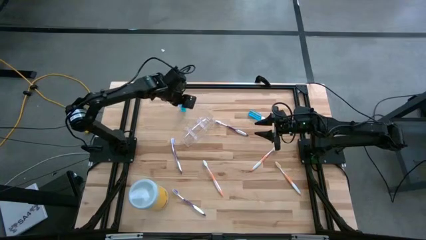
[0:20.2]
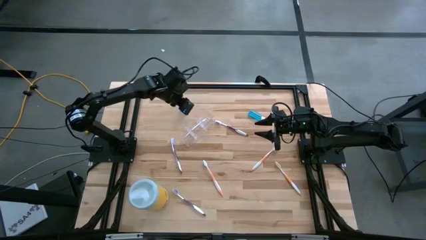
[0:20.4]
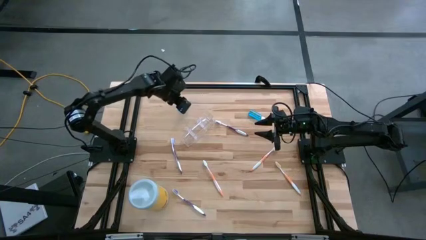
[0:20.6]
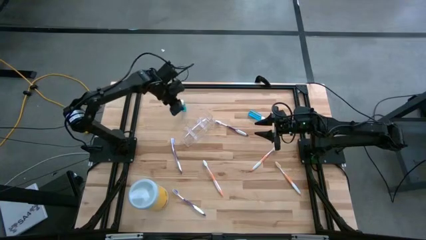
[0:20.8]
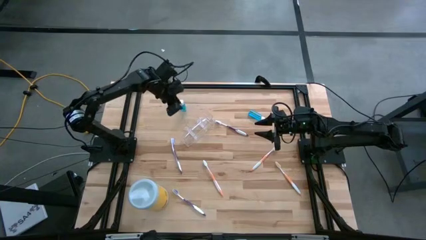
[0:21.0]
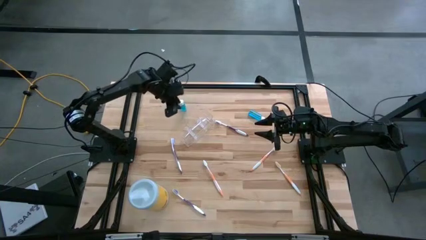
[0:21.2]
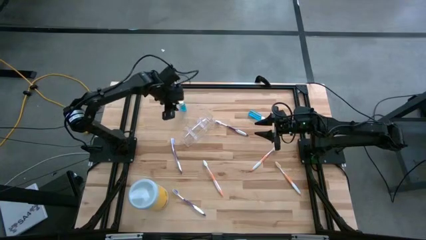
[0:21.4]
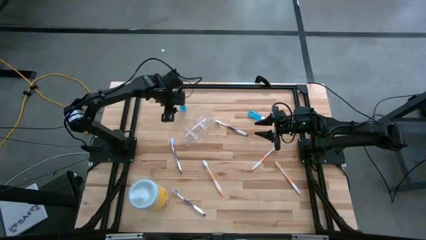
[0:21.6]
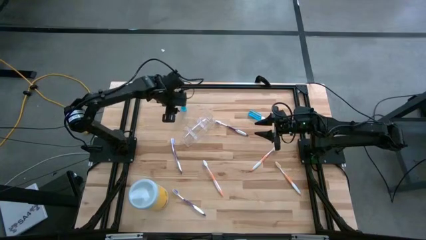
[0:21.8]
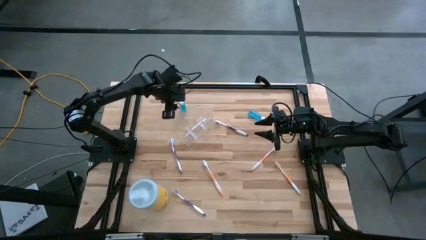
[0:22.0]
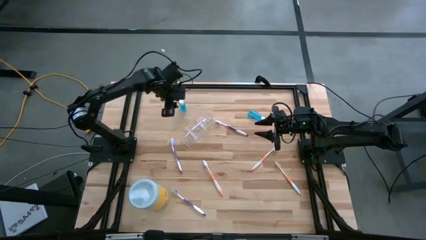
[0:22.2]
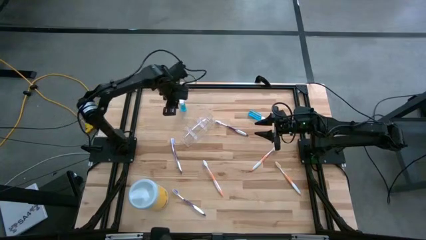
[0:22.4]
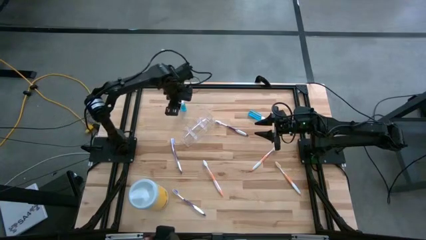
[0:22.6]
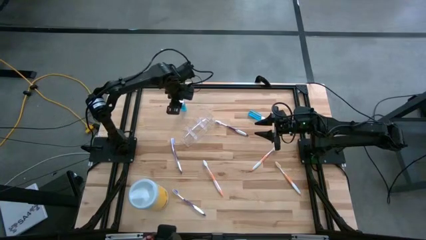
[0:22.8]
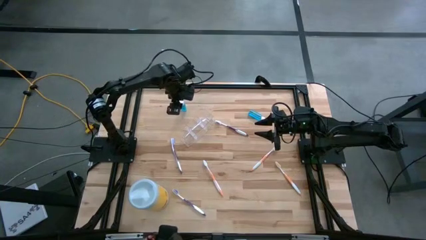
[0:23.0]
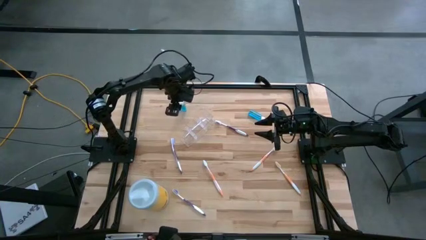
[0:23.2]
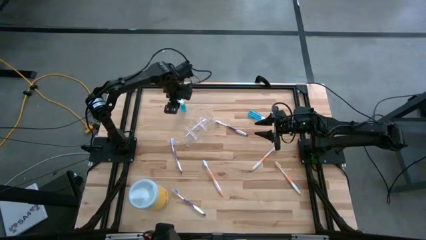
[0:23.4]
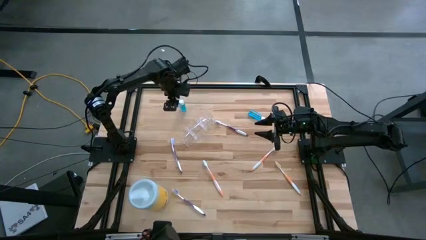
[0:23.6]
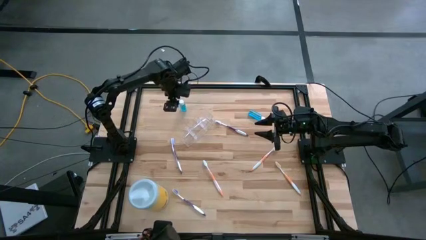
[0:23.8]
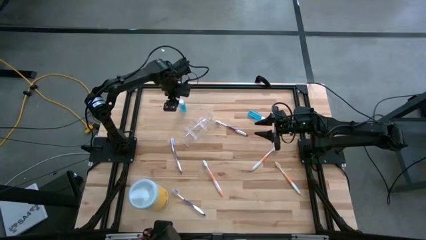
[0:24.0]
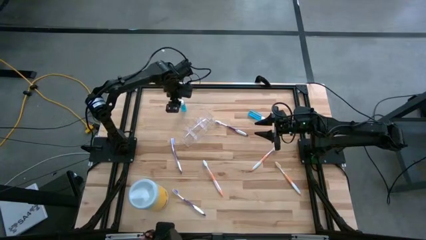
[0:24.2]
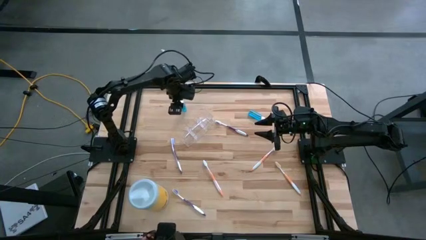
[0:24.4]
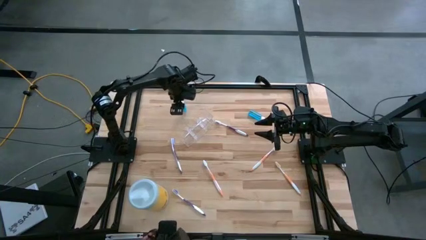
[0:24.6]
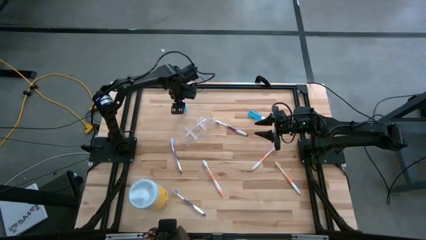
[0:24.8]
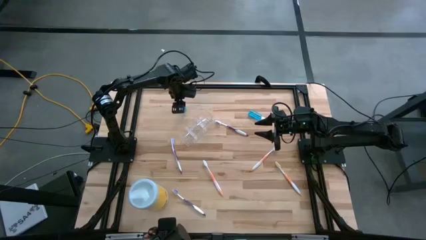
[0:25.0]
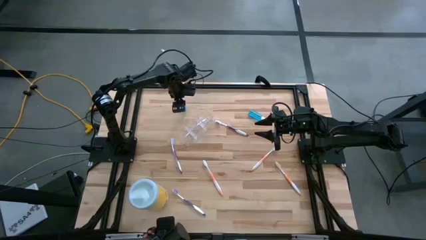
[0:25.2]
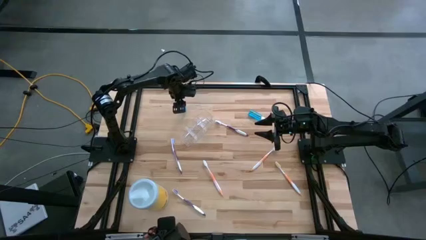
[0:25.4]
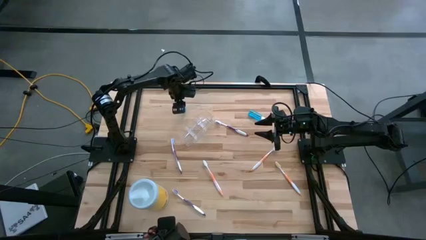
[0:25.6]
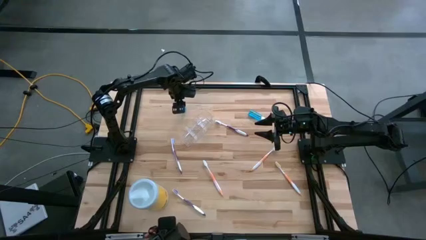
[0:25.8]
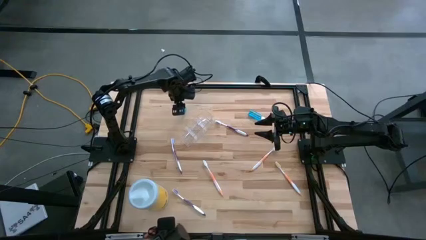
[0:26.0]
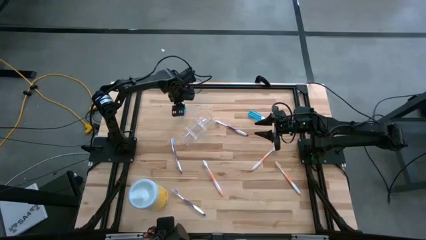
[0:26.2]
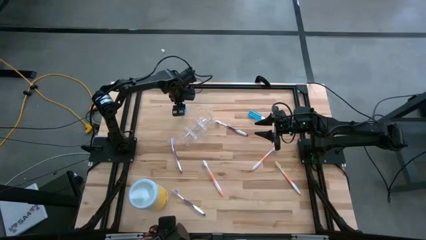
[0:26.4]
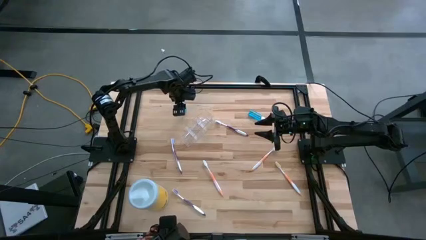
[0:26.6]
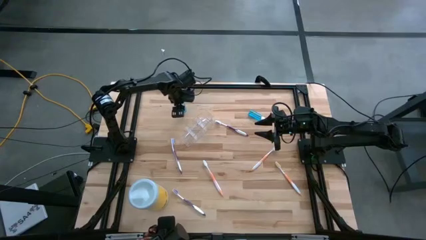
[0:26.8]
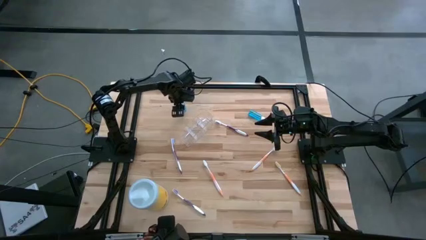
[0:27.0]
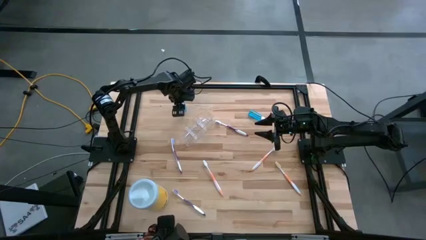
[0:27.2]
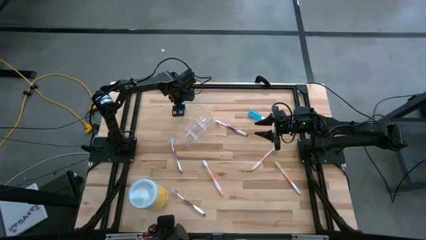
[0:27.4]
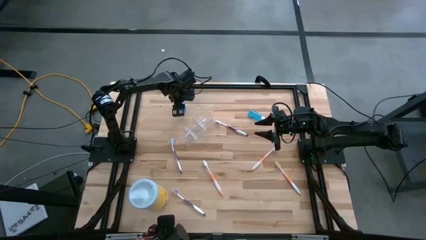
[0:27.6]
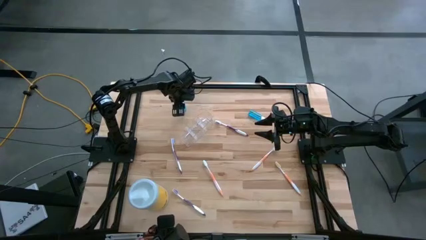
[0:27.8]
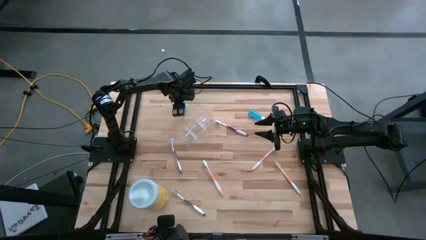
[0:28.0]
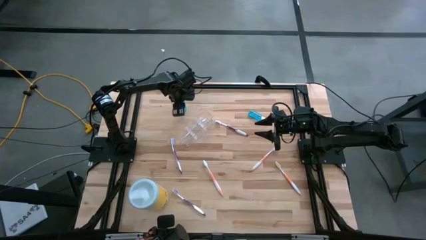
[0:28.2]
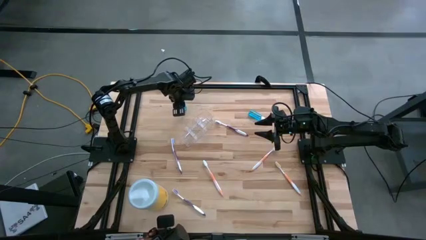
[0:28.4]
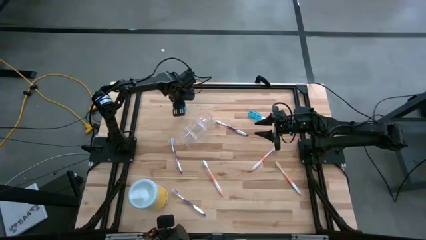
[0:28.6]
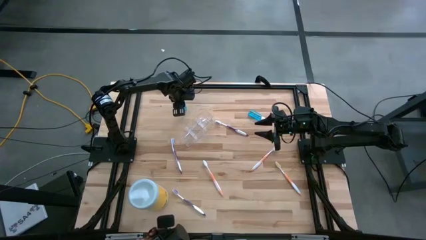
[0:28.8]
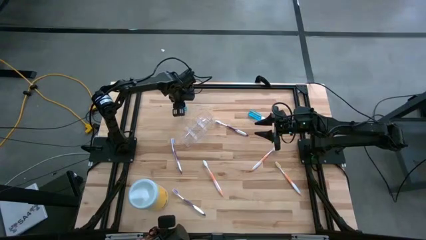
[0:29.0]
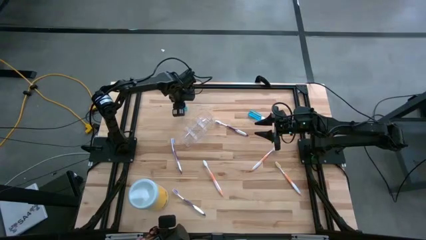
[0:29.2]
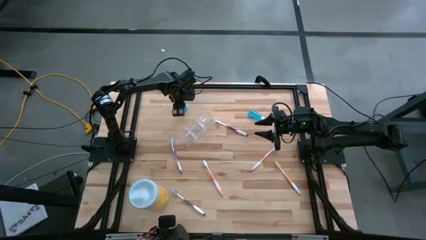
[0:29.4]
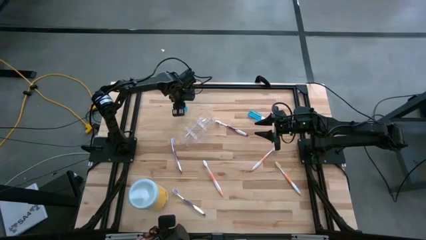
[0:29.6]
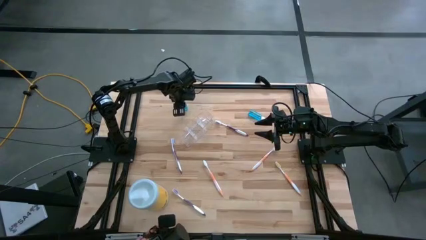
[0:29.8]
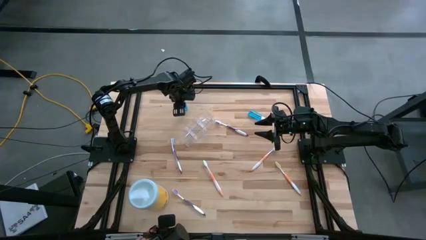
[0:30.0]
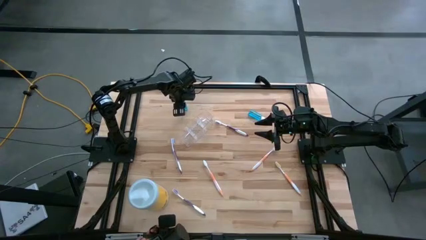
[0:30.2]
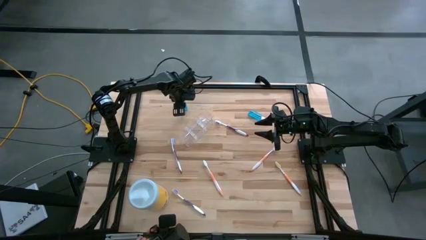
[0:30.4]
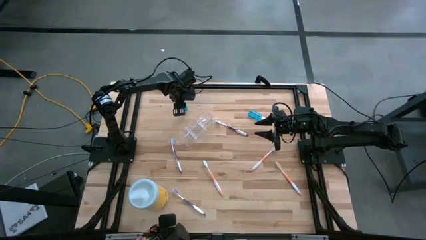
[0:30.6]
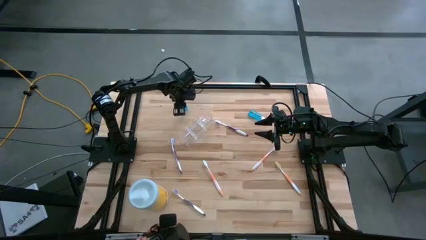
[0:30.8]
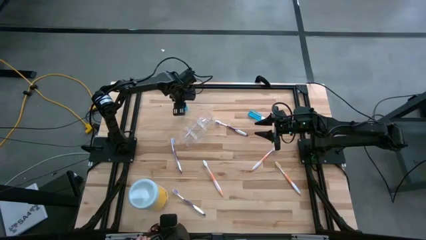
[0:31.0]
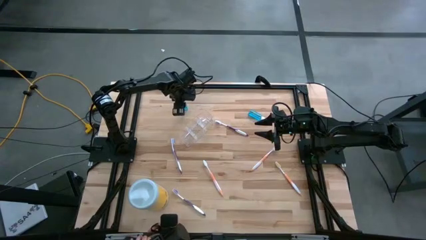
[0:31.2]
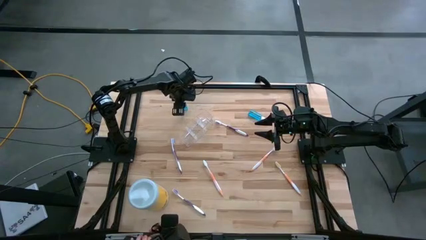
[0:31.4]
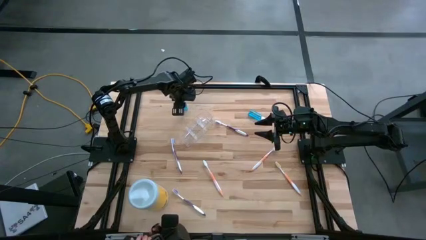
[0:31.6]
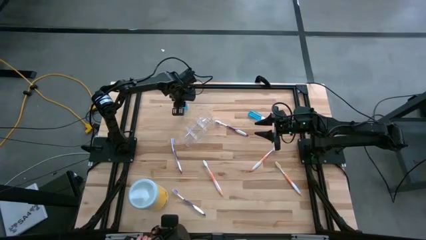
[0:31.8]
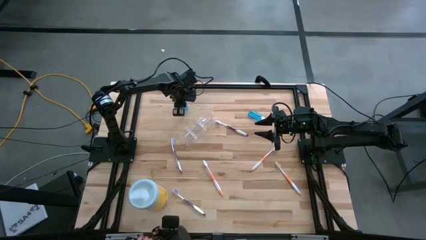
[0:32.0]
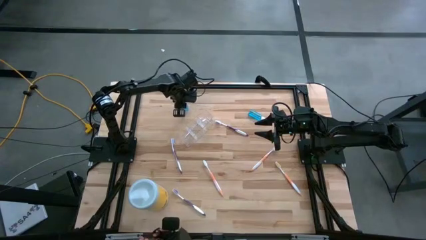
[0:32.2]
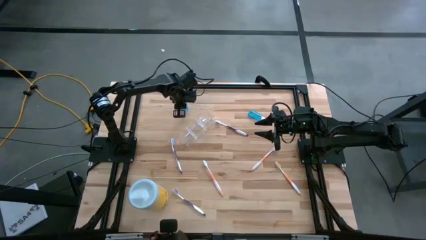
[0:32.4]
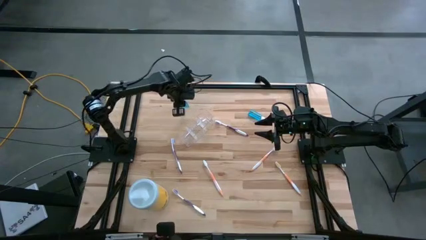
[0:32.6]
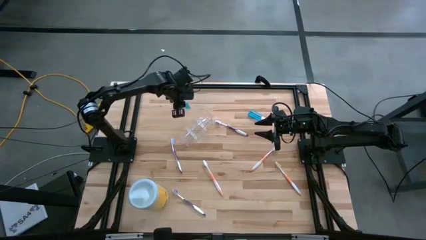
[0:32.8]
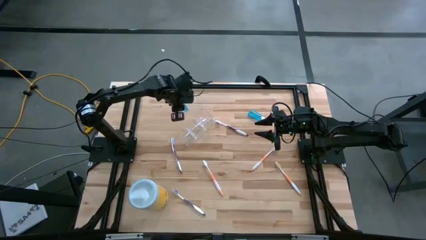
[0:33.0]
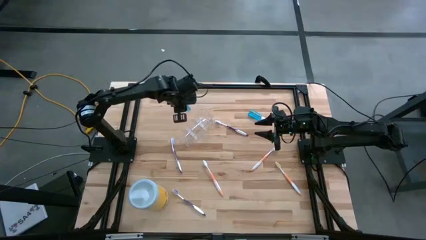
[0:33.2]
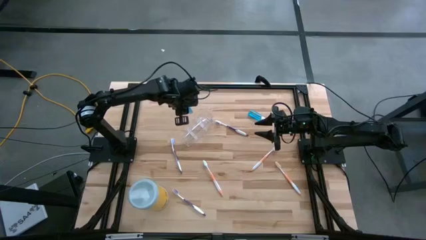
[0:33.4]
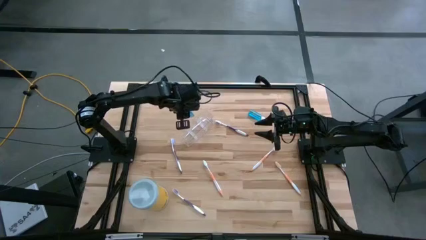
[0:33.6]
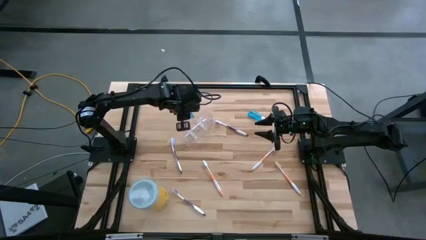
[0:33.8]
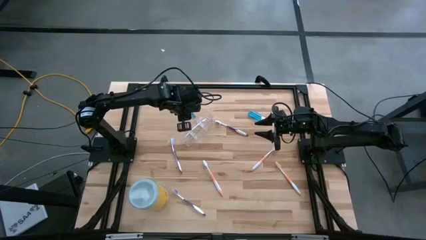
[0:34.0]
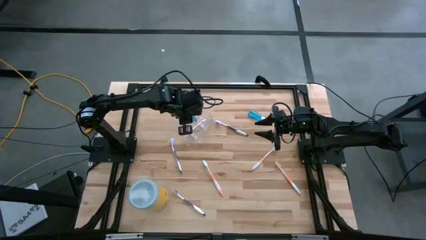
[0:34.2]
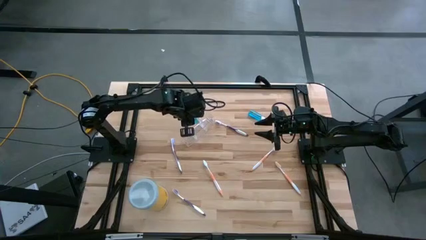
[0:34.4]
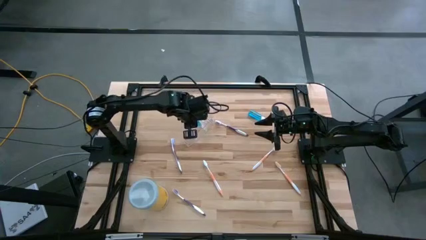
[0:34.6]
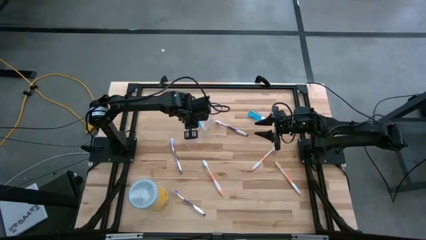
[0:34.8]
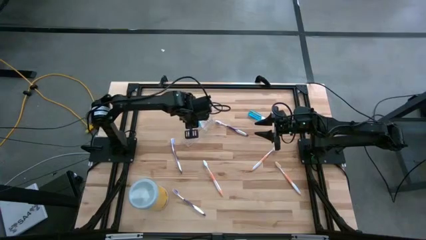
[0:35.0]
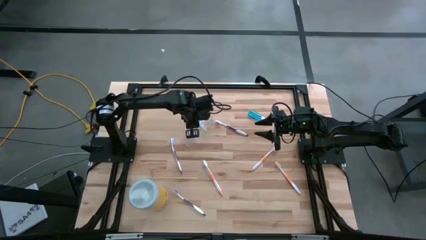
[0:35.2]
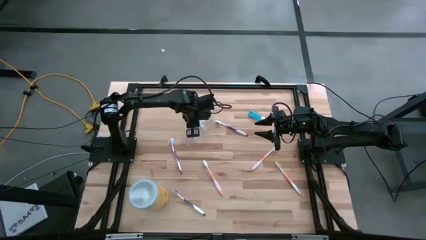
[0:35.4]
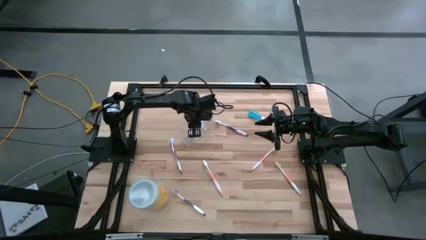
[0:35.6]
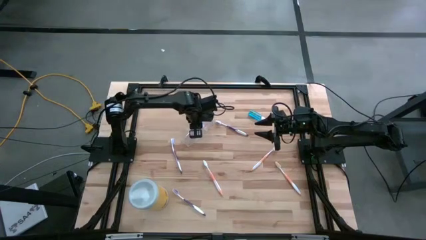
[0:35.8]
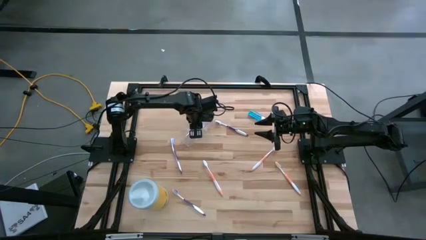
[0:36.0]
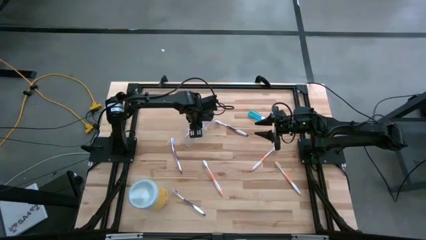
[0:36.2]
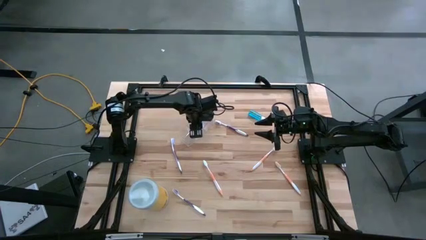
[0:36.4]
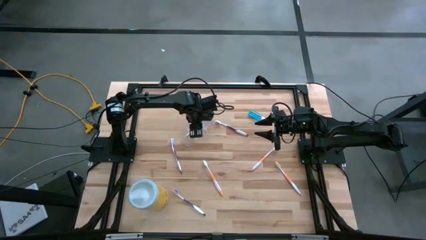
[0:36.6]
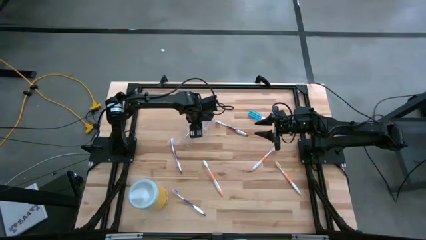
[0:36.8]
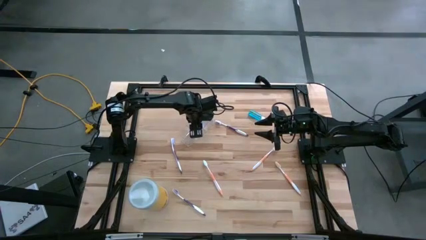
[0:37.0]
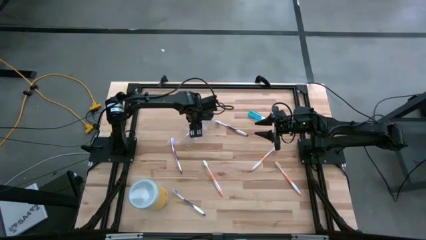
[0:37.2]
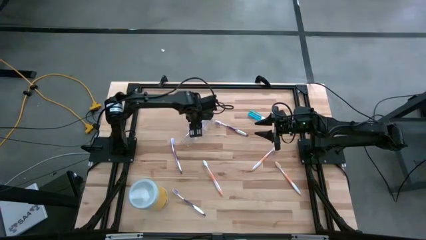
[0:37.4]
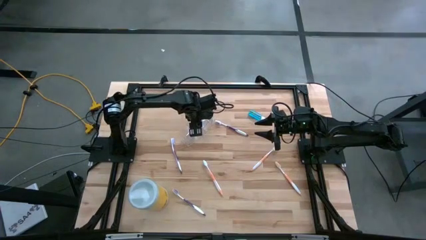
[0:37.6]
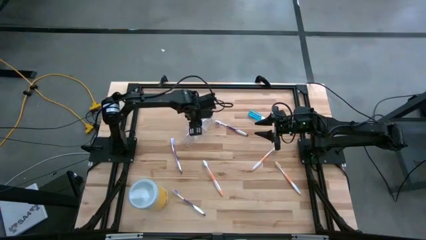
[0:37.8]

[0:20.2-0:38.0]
Task: Pick & Place toothbrushing station
Put the left blue mouthwash into the transparent organizer
